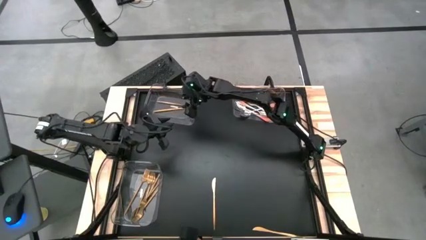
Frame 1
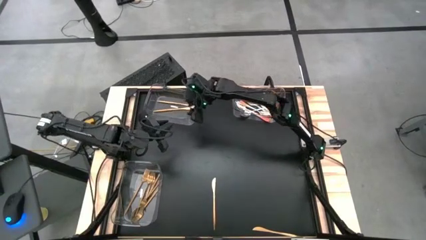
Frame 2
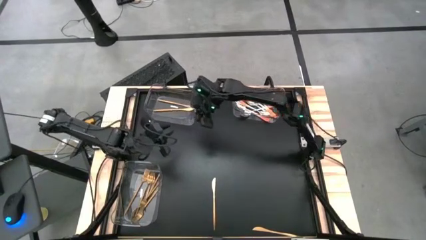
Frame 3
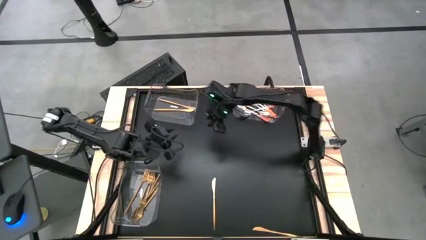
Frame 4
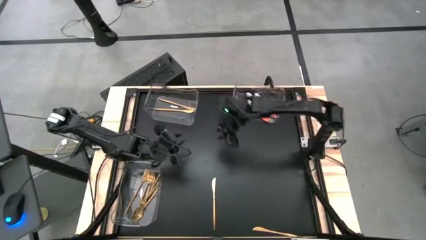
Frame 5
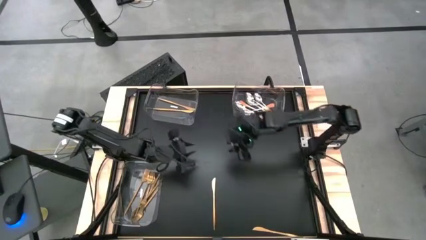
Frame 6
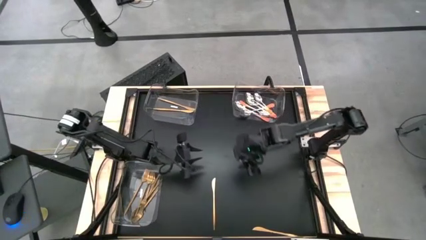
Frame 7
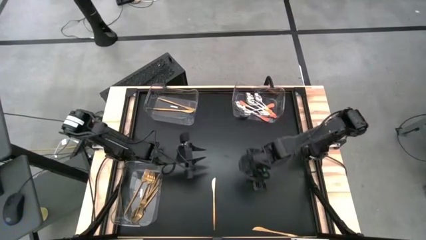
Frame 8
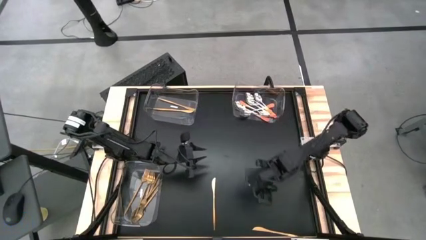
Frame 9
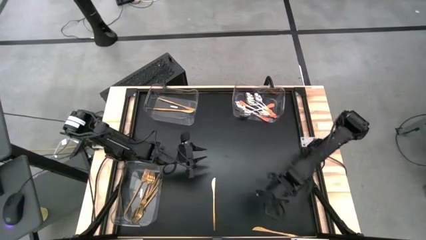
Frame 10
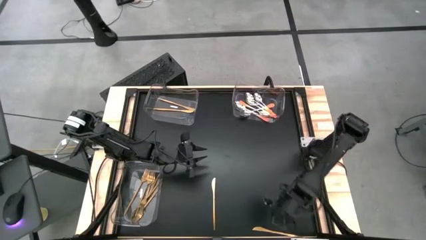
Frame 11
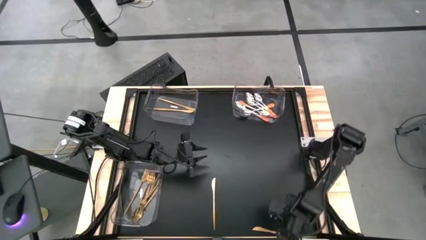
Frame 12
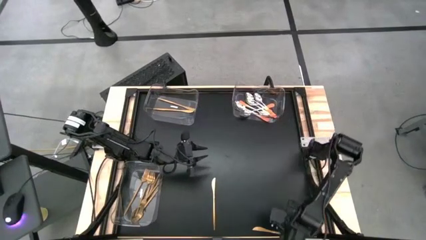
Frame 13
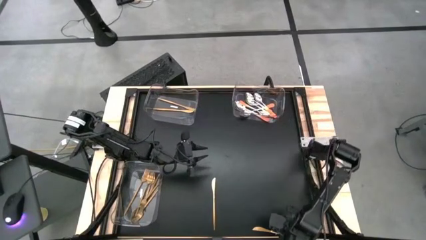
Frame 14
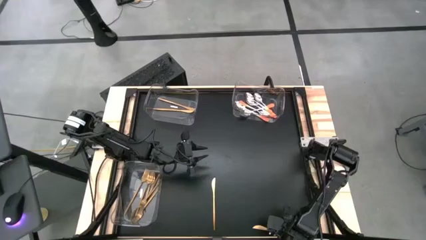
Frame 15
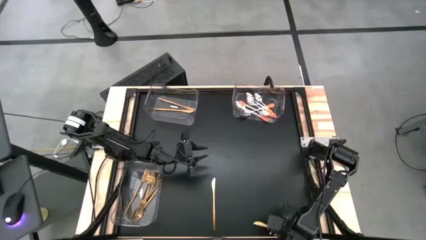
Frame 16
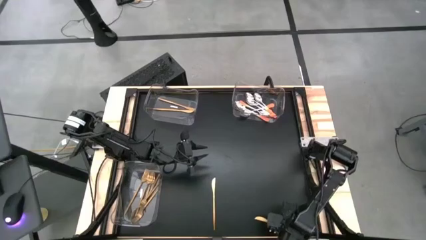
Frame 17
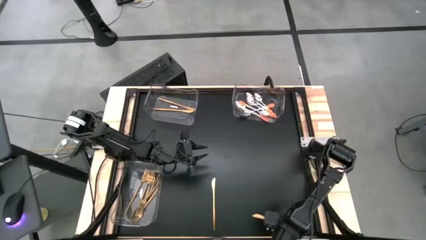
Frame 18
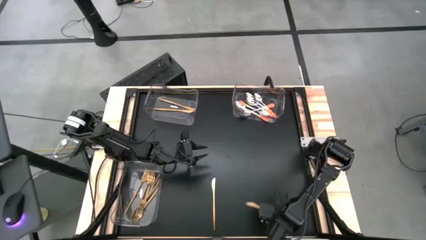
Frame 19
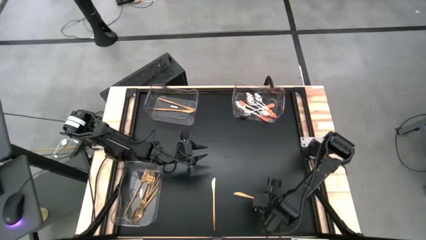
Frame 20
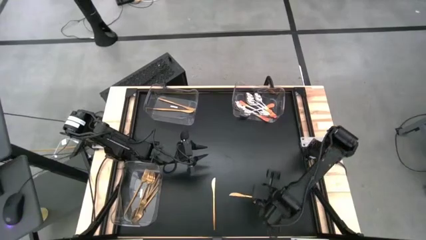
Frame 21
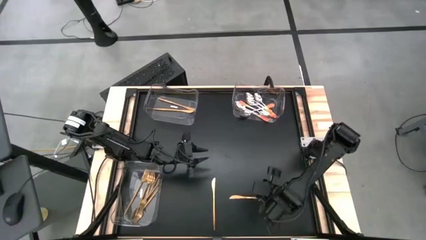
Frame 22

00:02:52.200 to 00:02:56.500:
Task: Sort silverware by color (type)
Put the gold table knife into the top left transparent bin

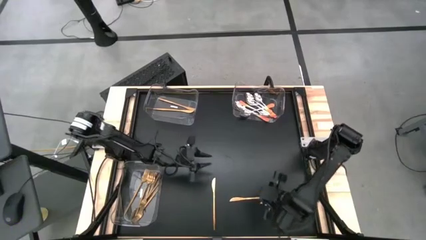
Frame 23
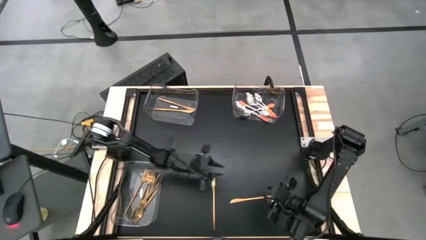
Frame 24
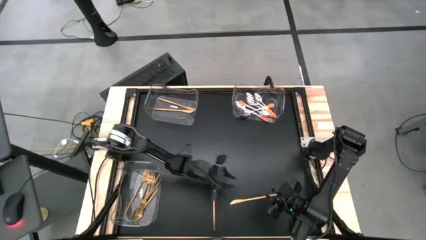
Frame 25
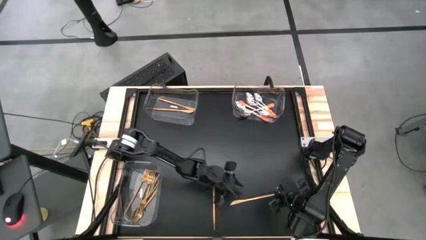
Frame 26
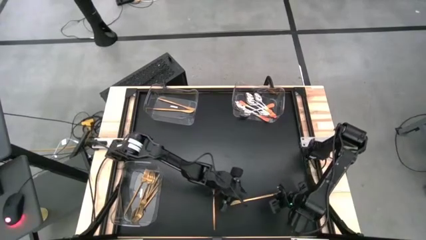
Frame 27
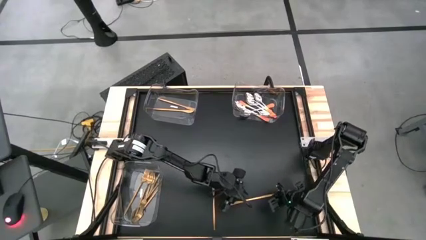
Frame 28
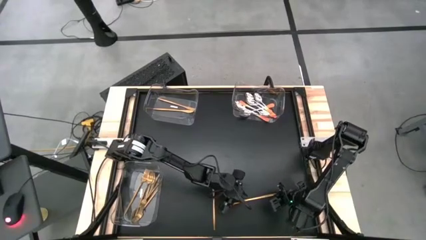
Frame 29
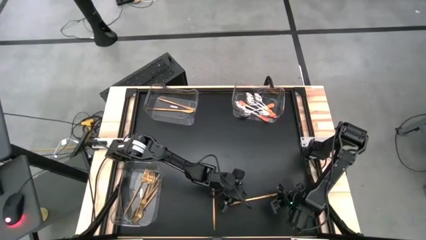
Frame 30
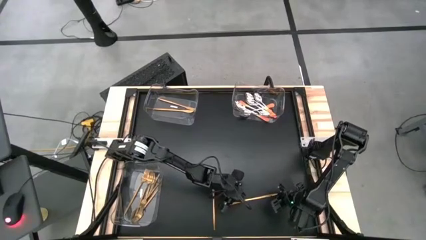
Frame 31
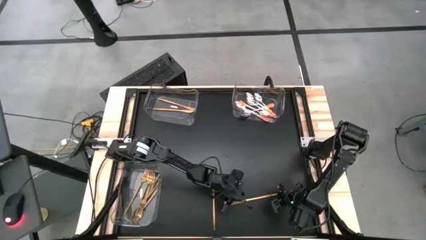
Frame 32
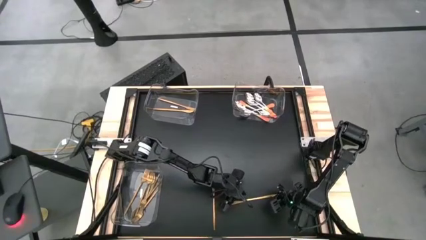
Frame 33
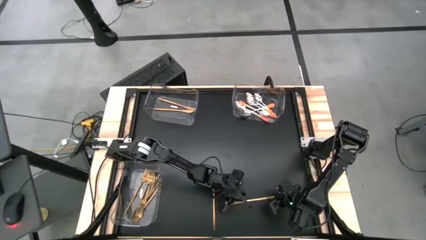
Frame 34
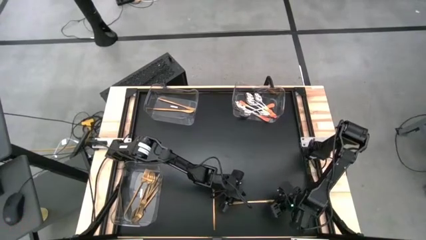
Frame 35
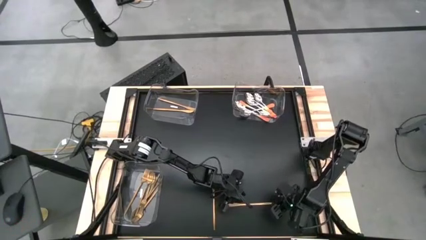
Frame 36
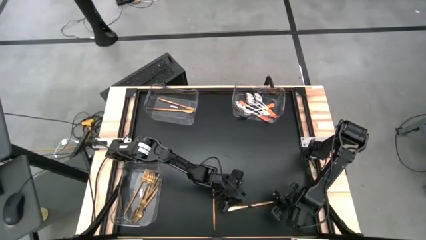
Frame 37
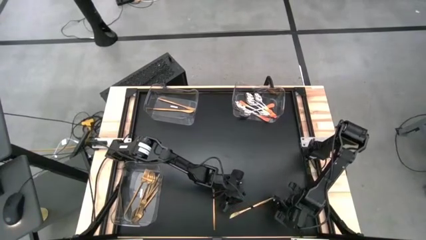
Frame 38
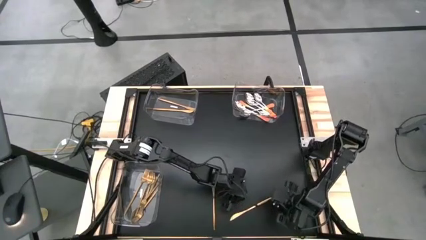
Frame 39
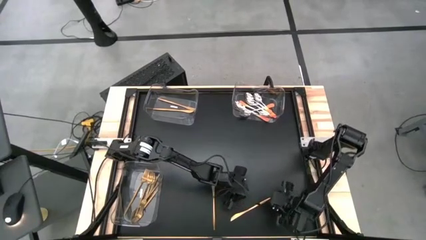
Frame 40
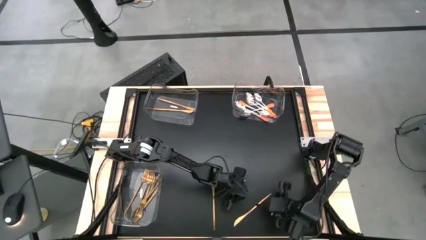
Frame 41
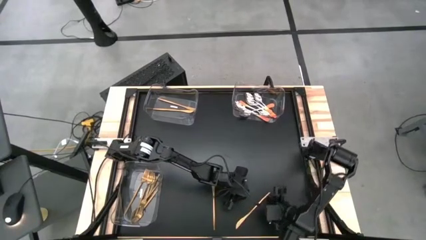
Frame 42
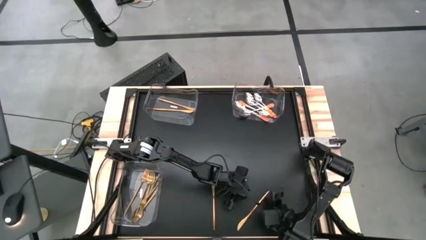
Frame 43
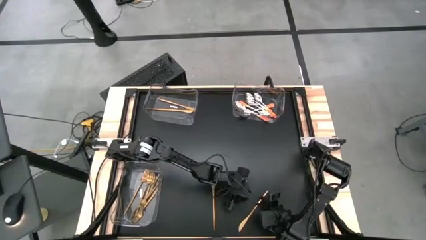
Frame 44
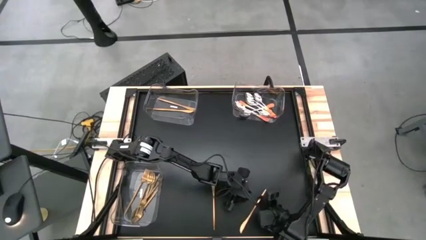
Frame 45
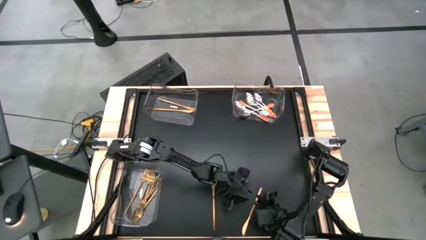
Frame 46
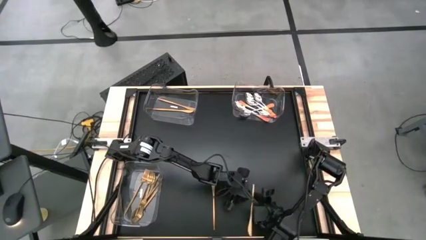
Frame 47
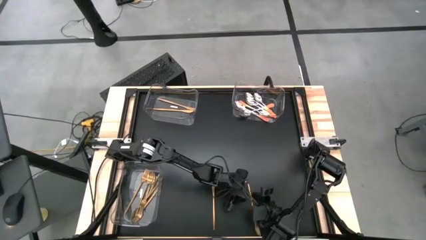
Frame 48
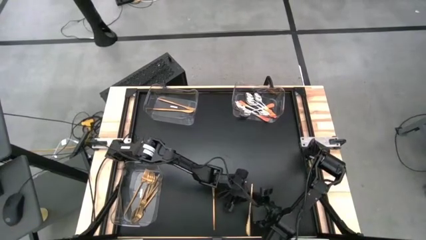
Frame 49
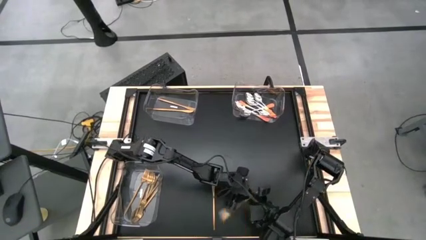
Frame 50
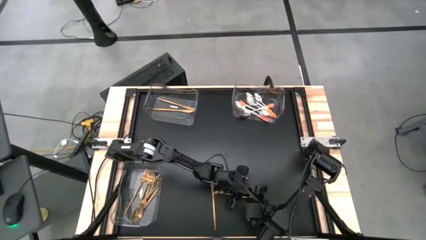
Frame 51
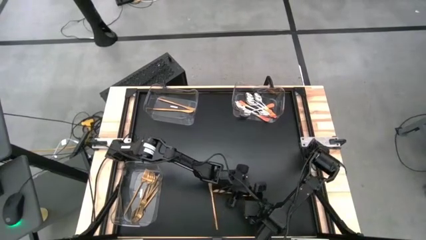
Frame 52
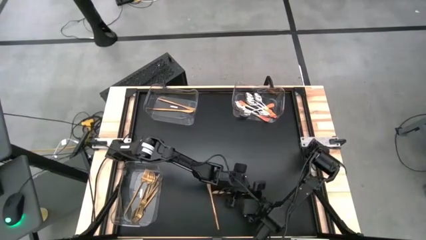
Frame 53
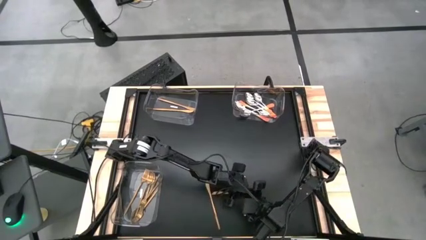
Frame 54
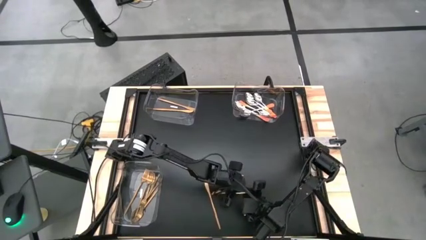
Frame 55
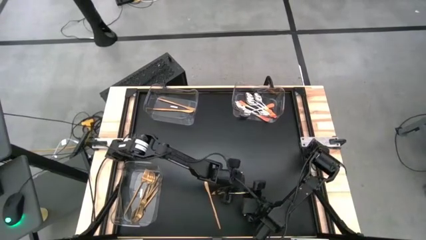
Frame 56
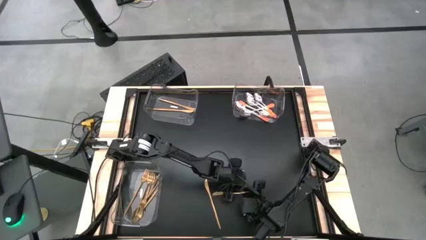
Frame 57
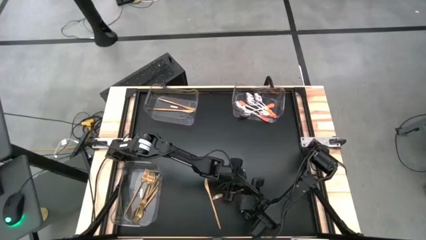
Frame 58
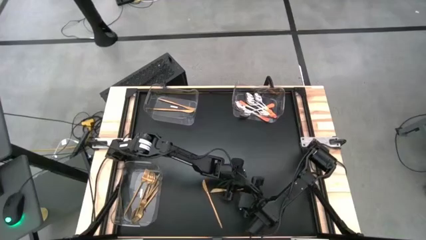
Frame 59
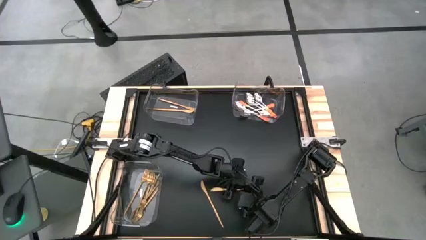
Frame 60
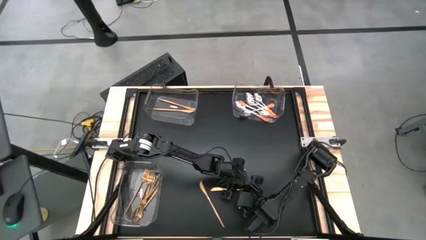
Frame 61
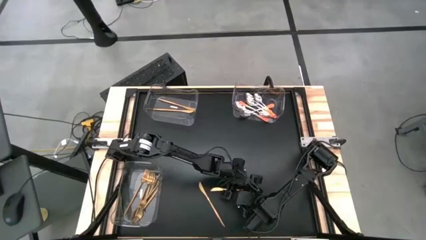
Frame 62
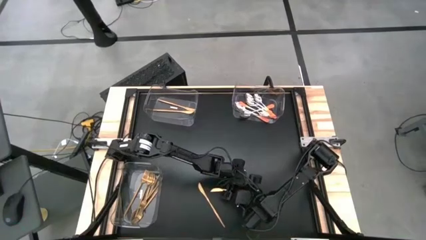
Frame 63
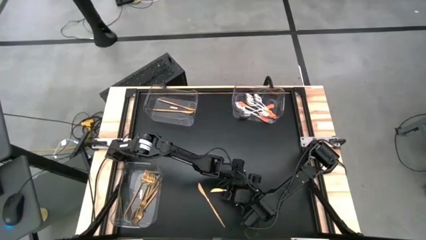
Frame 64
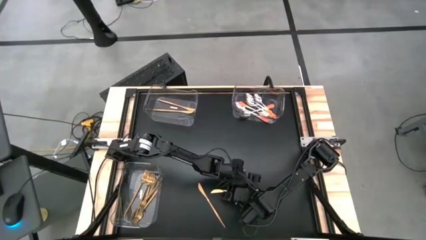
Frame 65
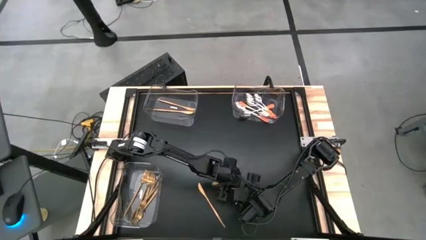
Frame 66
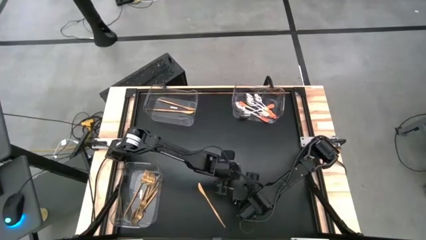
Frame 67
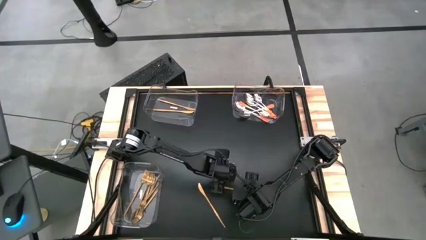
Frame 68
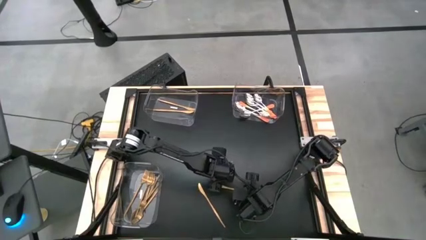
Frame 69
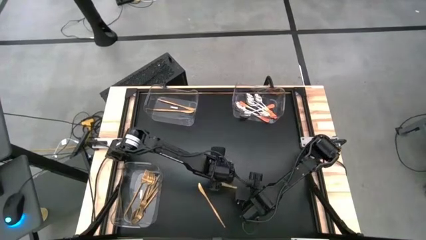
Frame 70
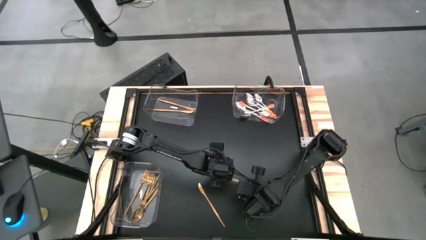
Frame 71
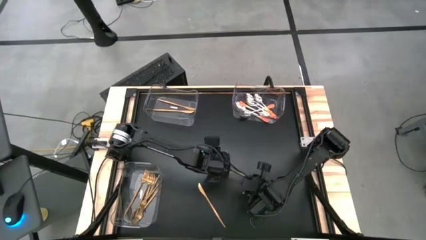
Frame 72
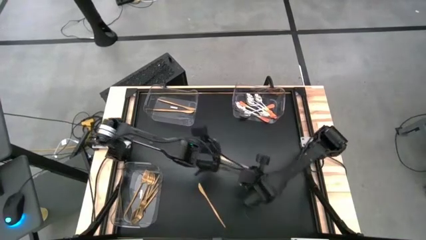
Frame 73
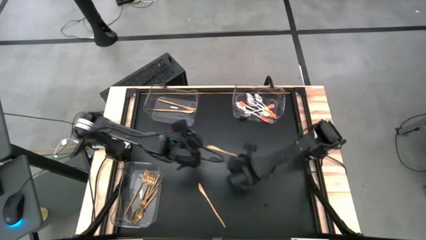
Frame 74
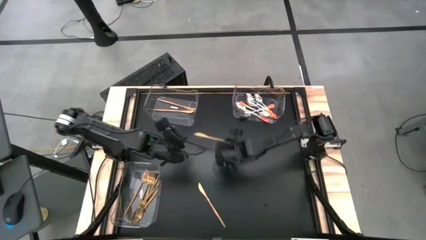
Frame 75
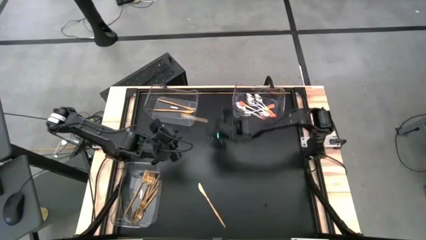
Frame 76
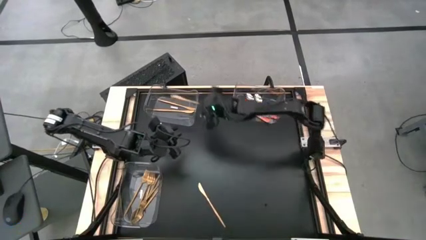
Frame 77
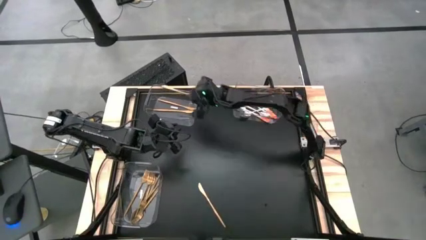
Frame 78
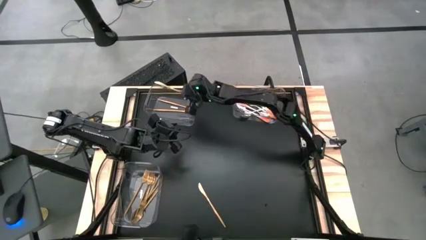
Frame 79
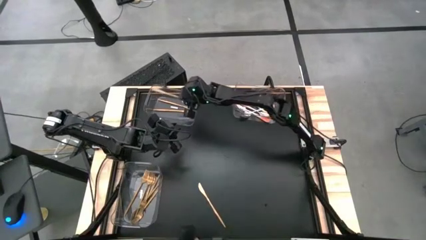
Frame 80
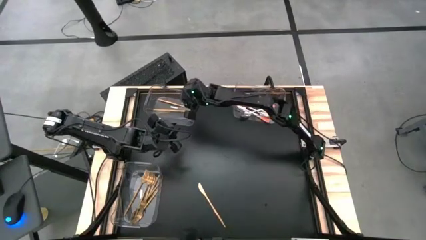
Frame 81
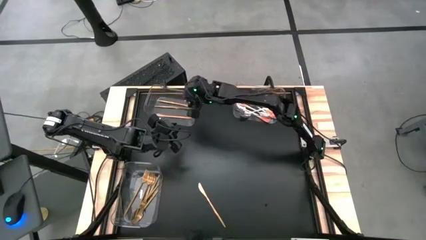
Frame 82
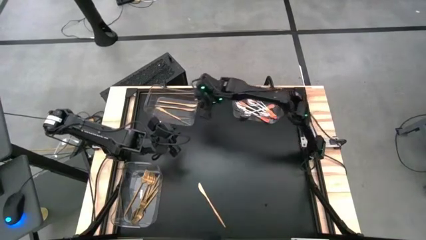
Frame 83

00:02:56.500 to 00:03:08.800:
Put the gold table knife into the top left transparent bin
